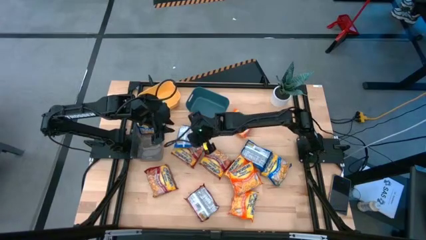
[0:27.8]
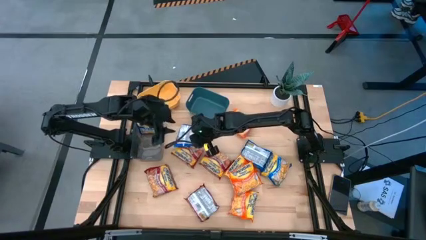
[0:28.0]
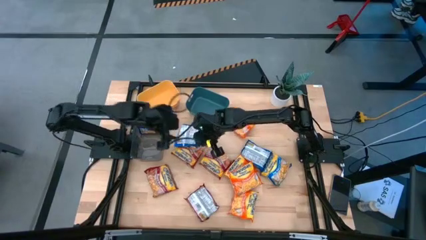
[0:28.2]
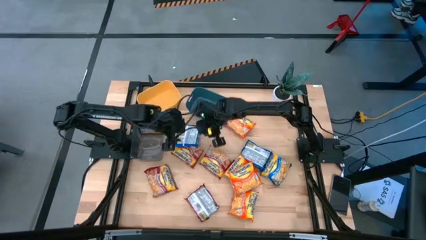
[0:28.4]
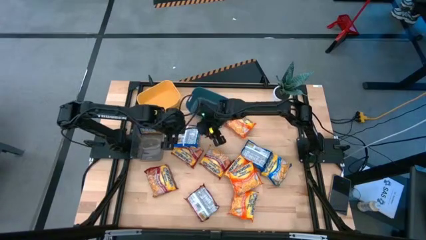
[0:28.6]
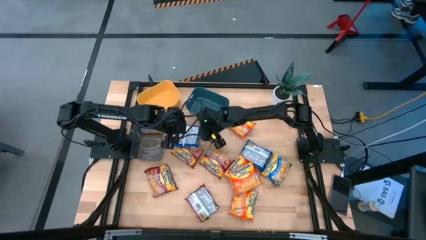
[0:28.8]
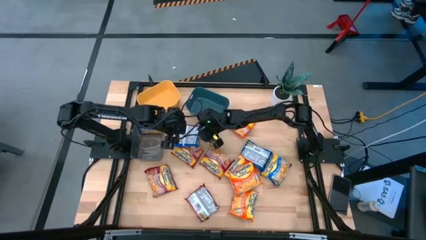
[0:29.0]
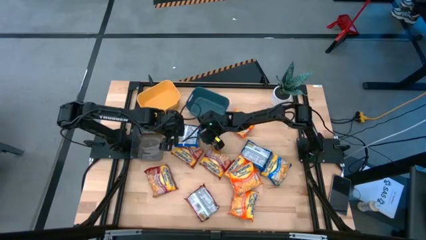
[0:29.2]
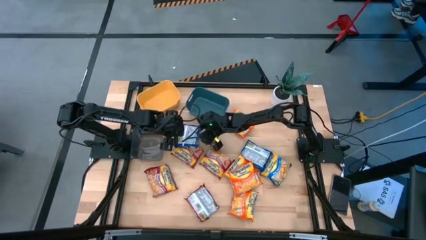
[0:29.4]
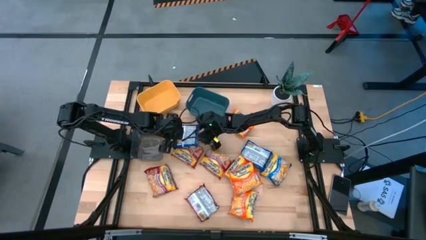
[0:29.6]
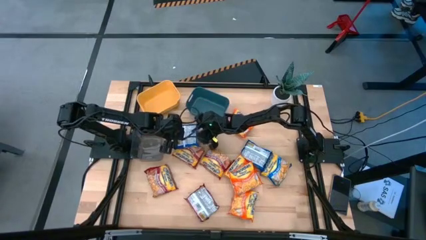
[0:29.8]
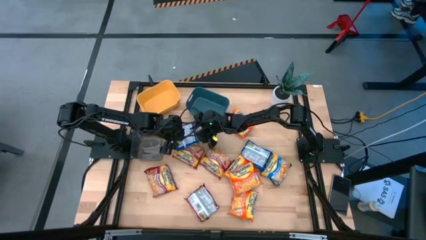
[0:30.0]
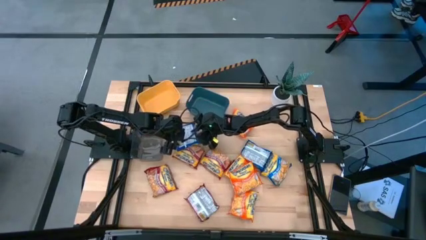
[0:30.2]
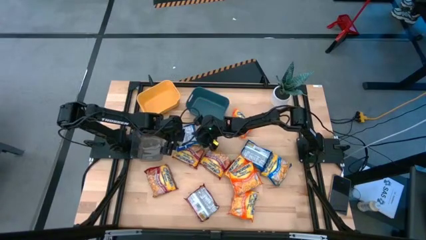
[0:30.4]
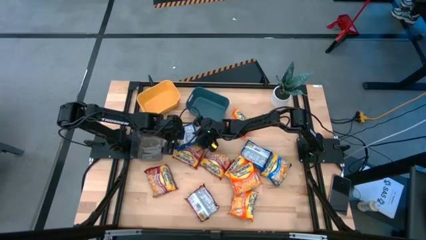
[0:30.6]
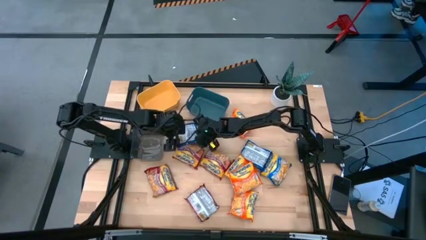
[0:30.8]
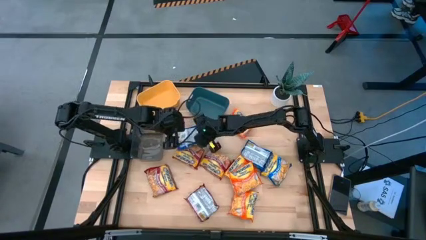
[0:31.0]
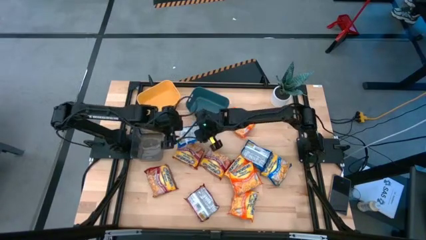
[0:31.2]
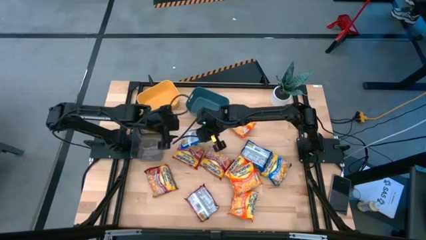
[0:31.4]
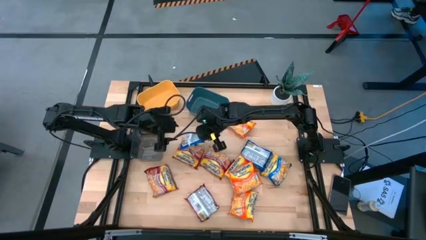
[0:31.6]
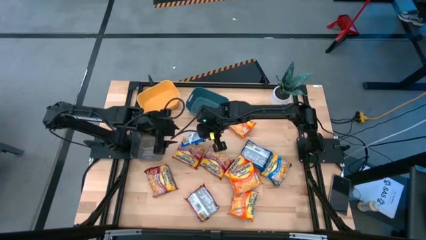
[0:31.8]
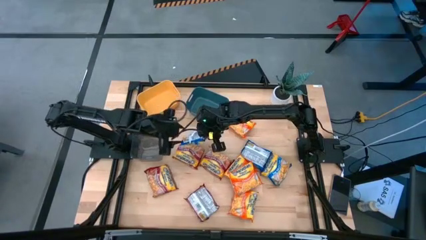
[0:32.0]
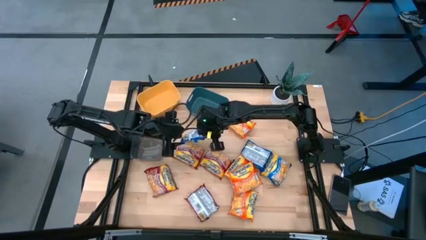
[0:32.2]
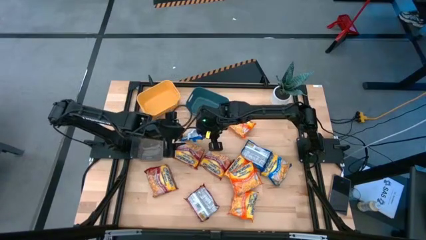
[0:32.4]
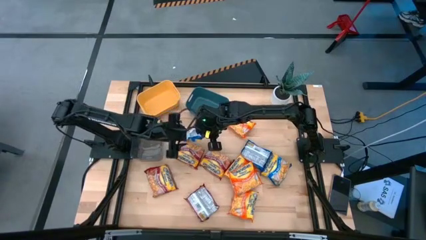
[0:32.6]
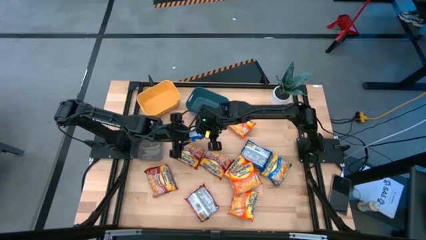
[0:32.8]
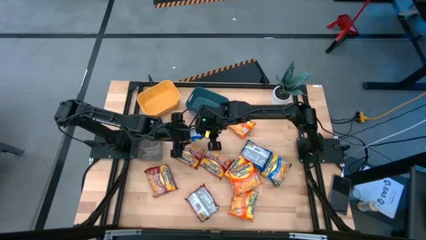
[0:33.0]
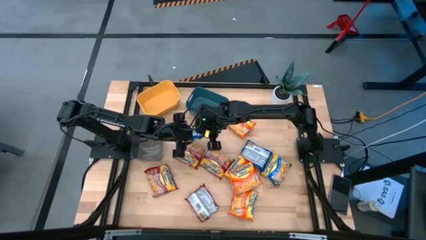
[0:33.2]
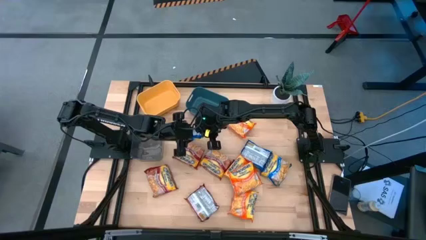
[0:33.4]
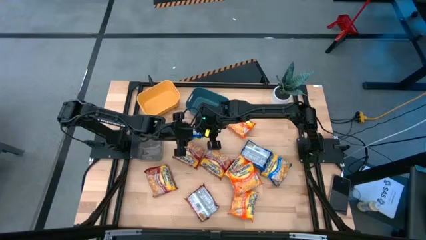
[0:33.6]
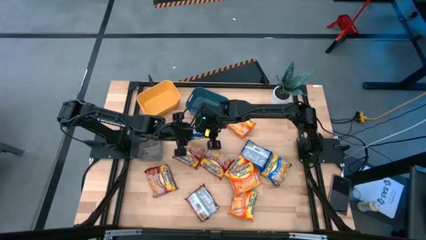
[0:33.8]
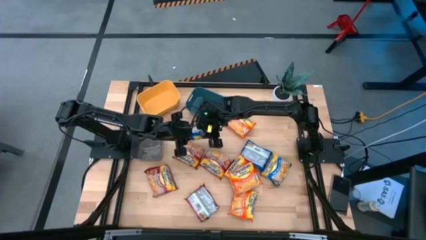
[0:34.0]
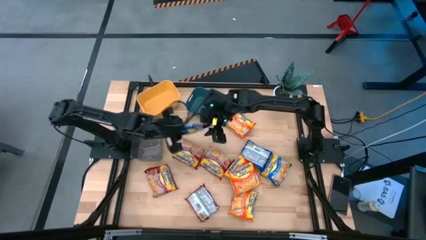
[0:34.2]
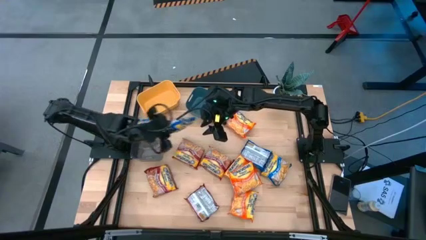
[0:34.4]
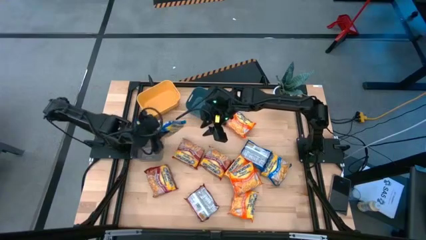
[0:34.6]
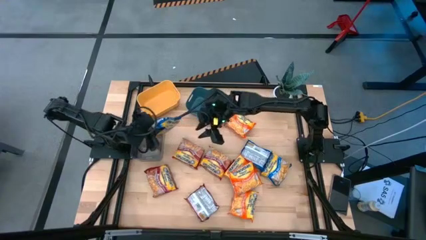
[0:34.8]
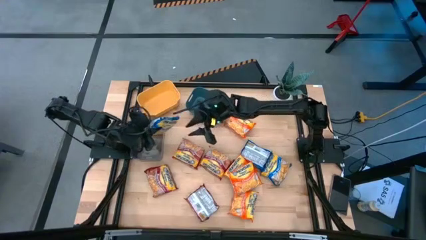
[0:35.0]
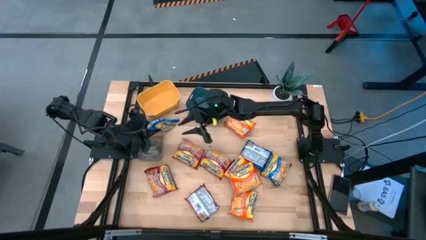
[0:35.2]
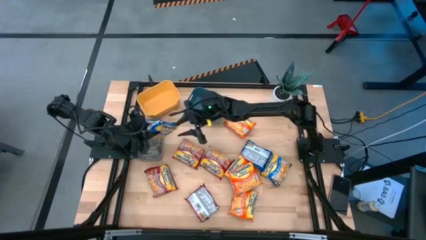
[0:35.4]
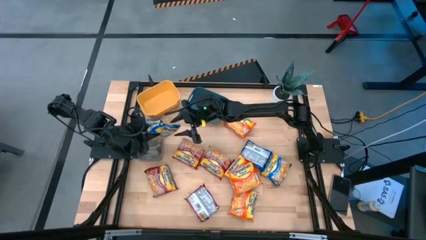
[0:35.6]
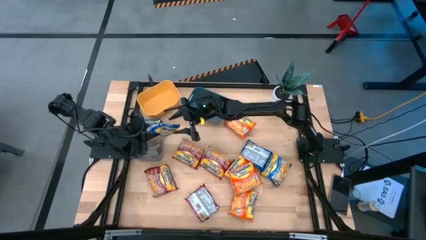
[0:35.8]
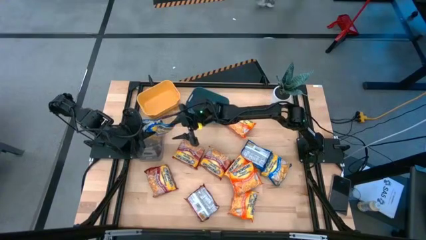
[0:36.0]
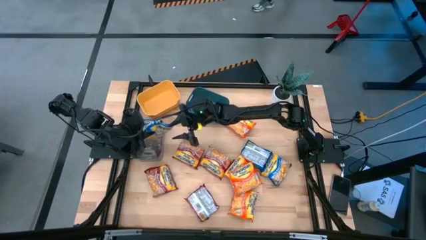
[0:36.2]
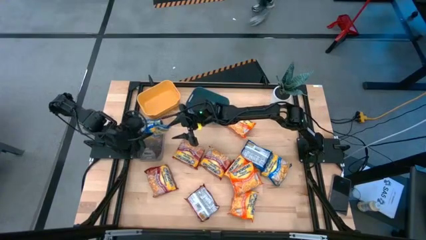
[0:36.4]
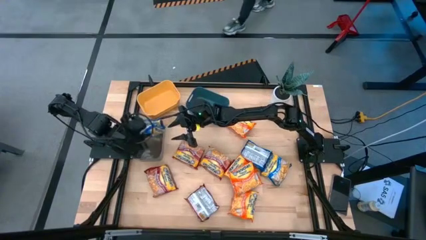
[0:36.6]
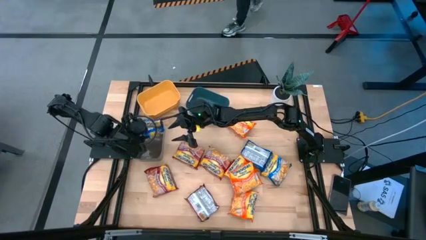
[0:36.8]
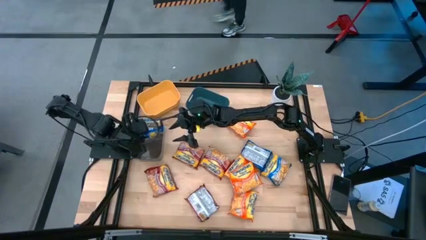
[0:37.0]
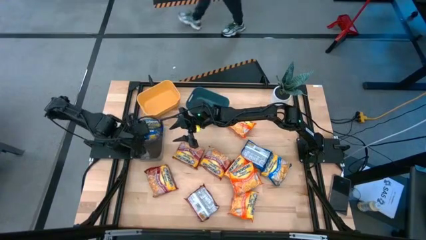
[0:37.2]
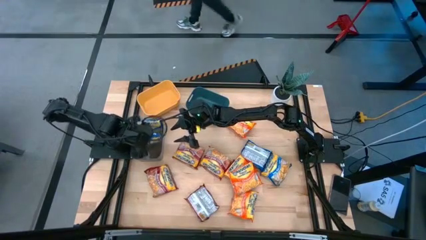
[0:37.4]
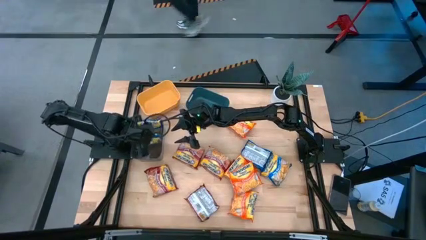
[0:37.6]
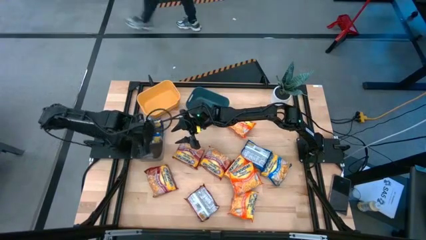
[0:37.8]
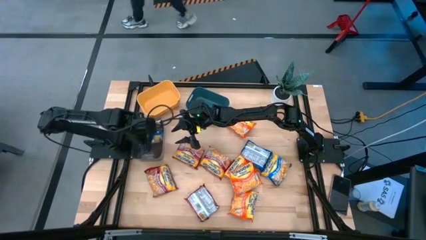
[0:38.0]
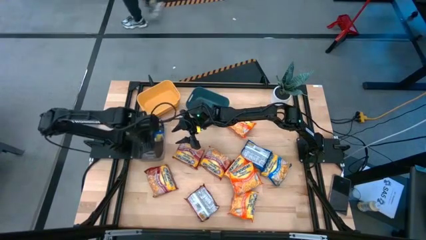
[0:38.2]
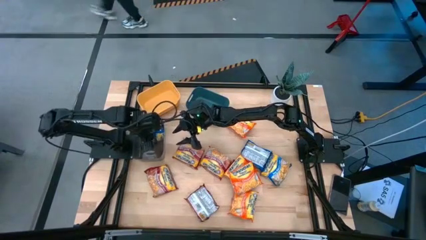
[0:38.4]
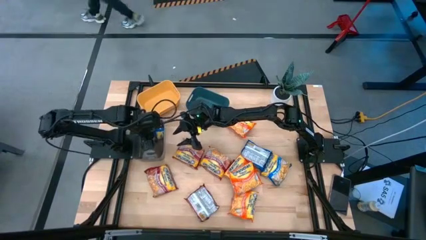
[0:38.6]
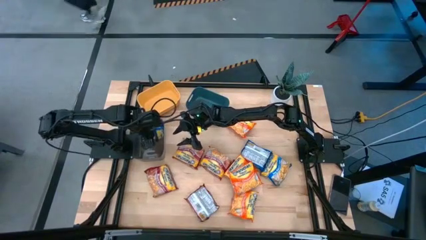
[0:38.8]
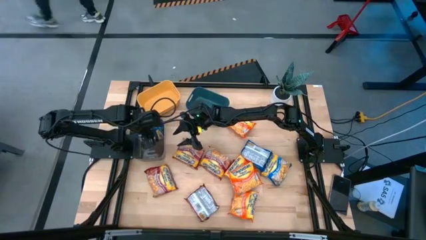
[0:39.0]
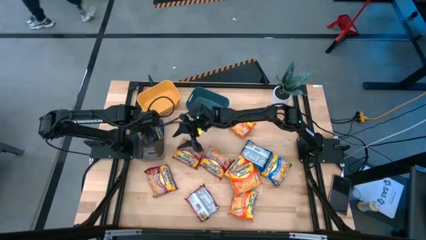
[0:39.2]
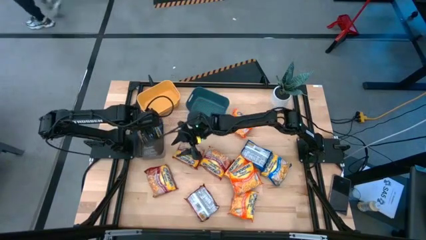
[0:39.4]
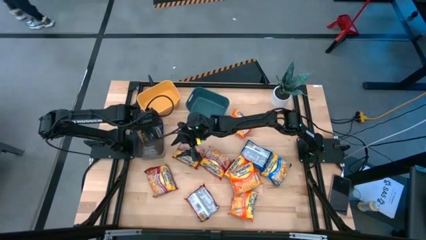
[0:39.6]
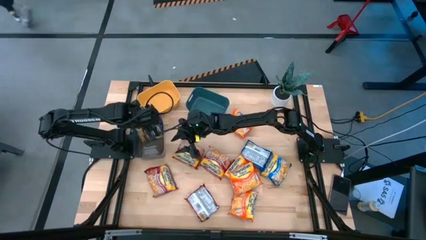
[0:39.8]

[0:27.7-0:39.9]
Task: Sort Maruchan noodles
Put the blue noodle pack into the black bin
